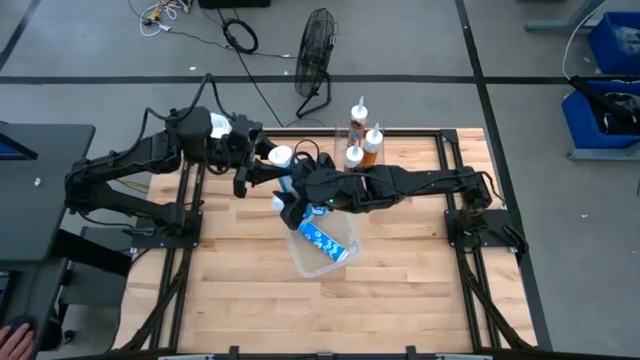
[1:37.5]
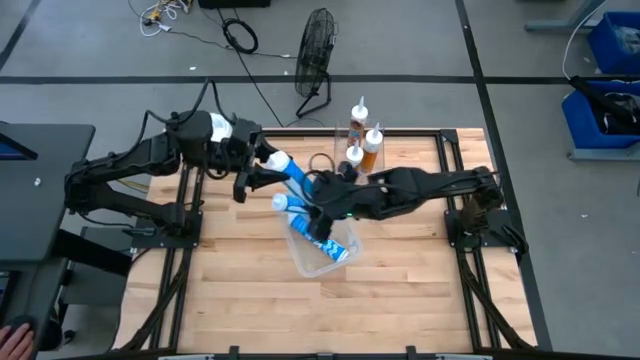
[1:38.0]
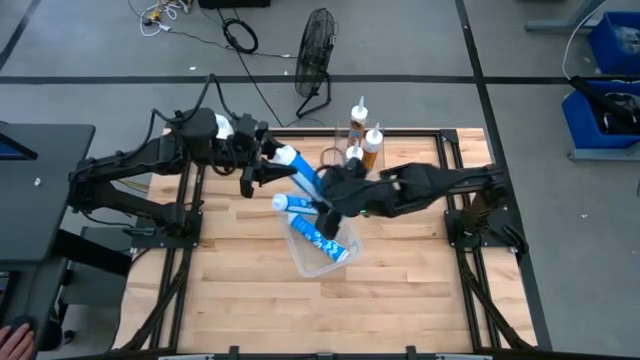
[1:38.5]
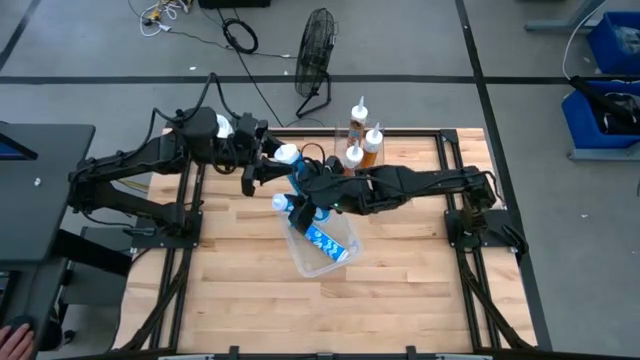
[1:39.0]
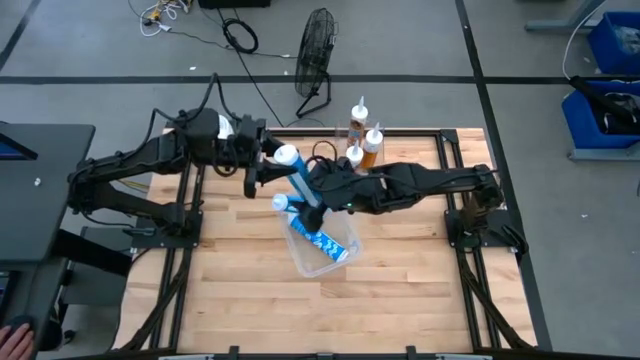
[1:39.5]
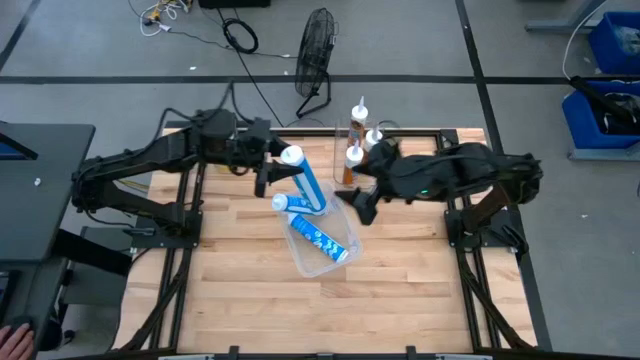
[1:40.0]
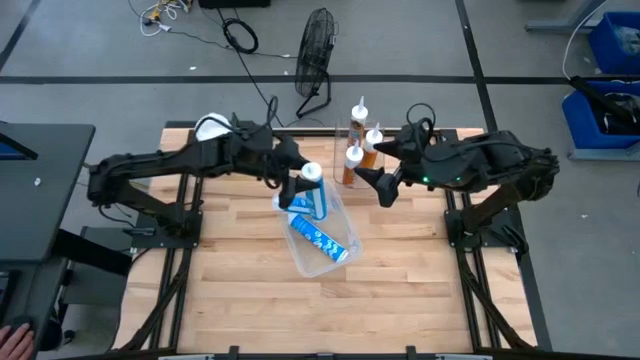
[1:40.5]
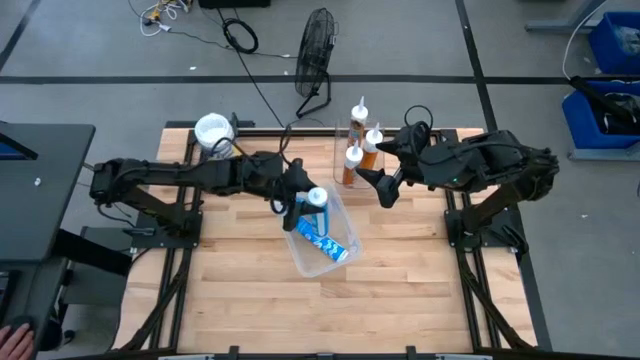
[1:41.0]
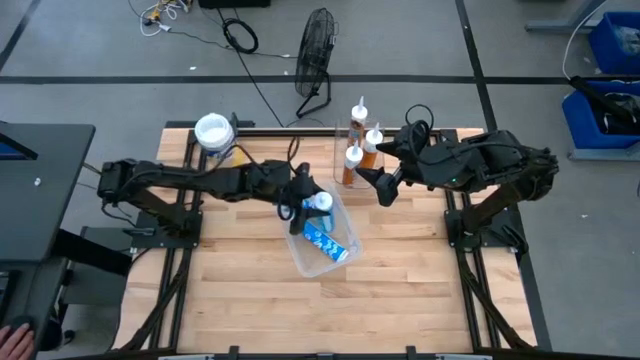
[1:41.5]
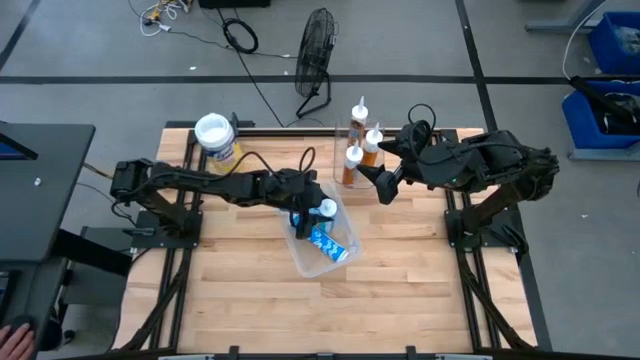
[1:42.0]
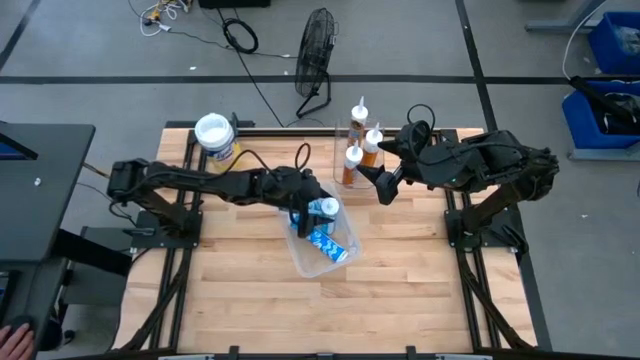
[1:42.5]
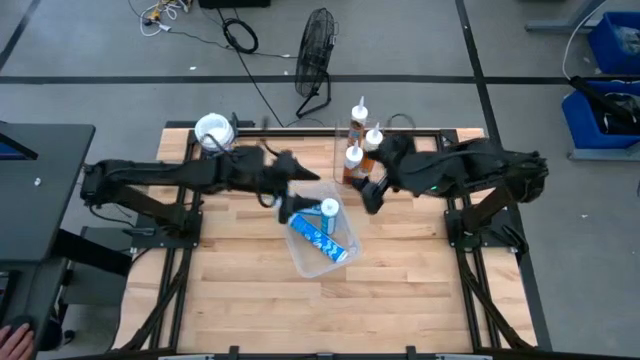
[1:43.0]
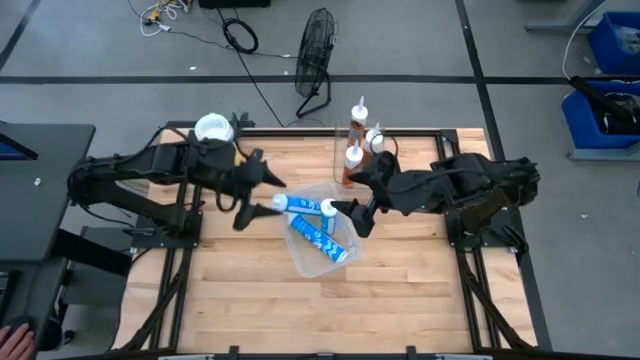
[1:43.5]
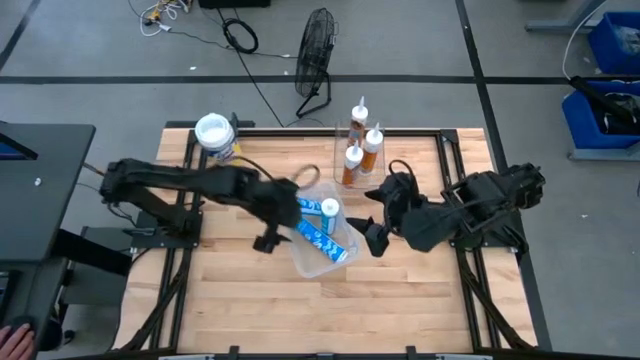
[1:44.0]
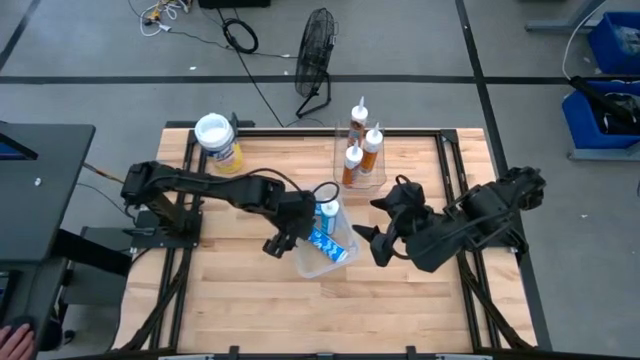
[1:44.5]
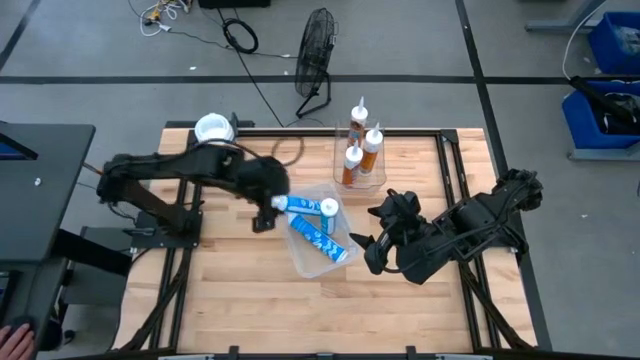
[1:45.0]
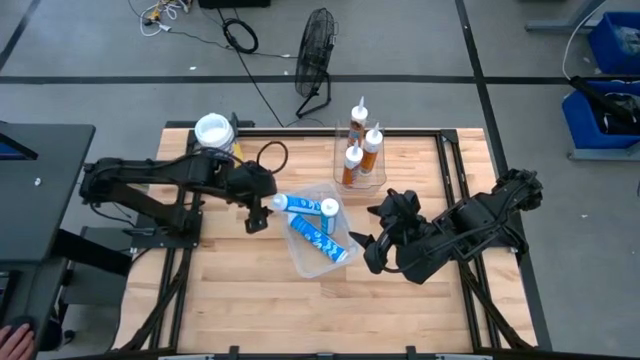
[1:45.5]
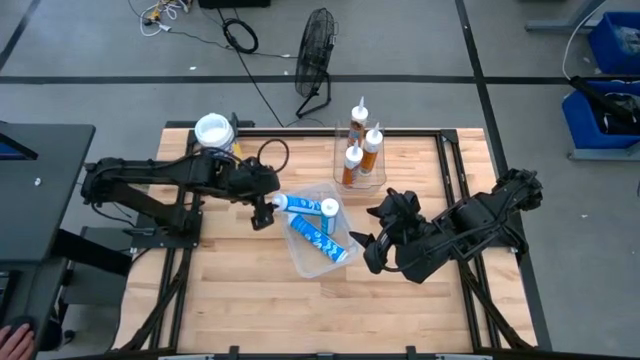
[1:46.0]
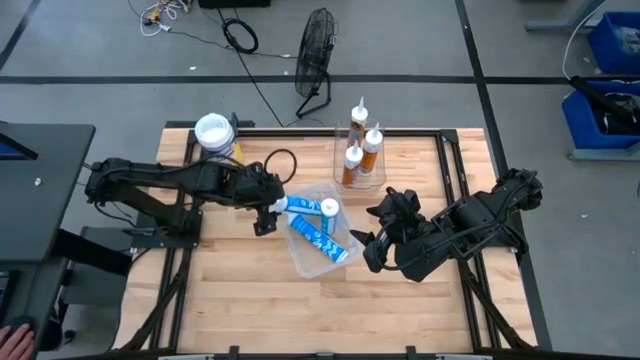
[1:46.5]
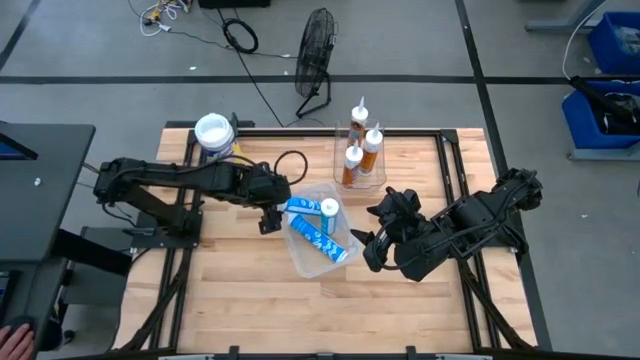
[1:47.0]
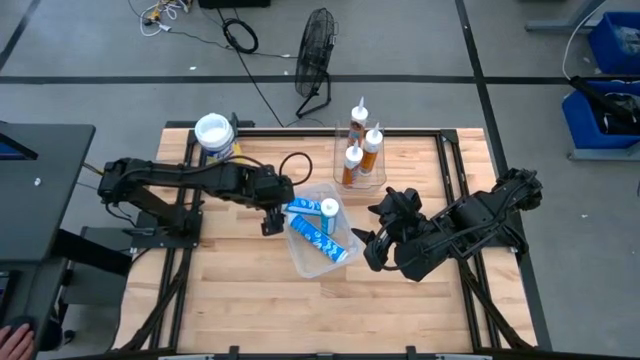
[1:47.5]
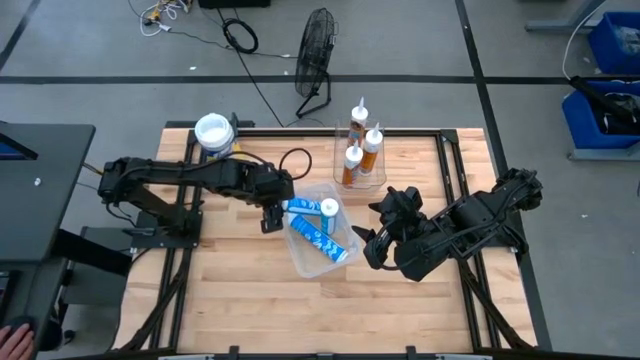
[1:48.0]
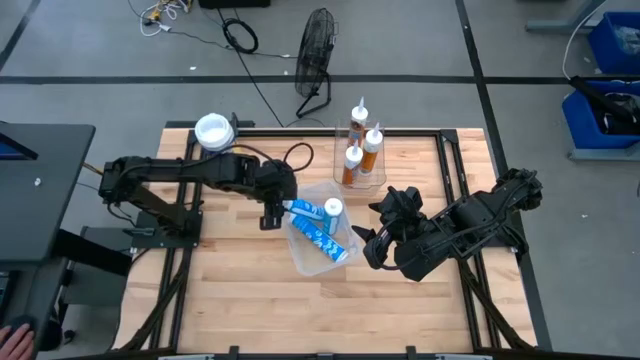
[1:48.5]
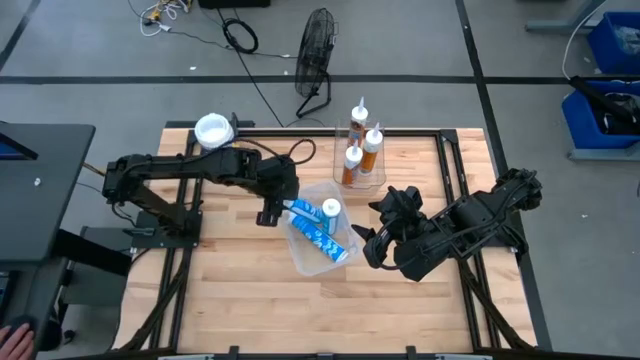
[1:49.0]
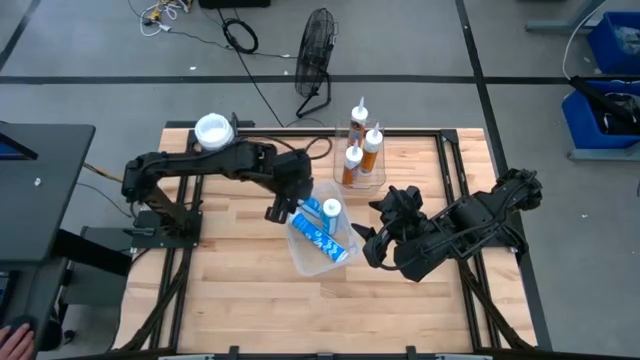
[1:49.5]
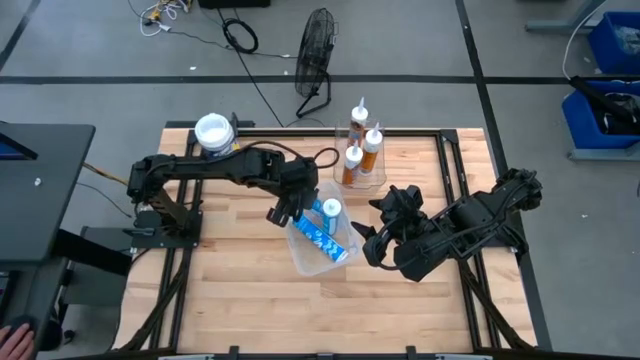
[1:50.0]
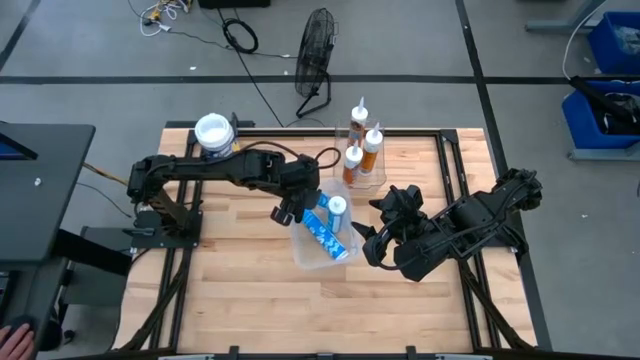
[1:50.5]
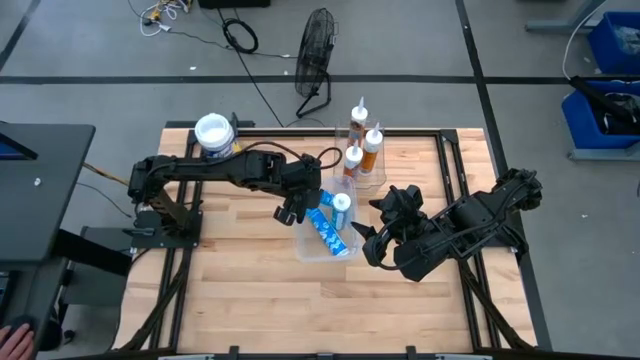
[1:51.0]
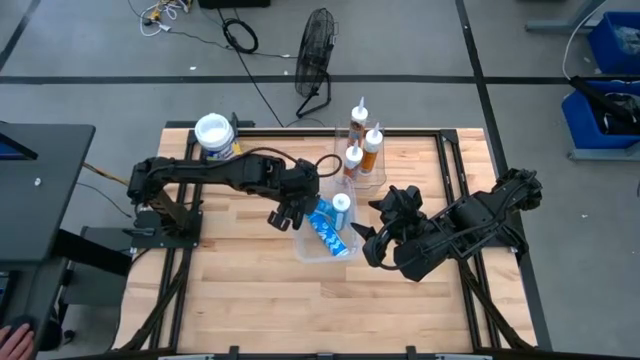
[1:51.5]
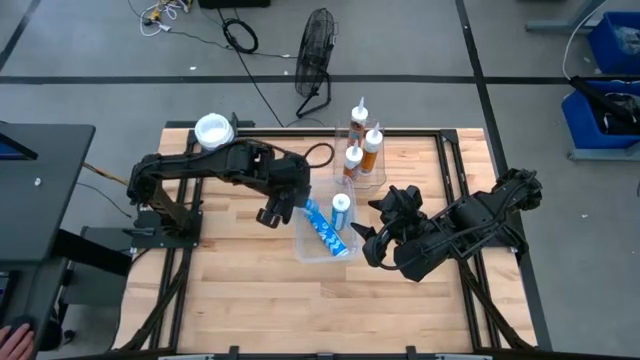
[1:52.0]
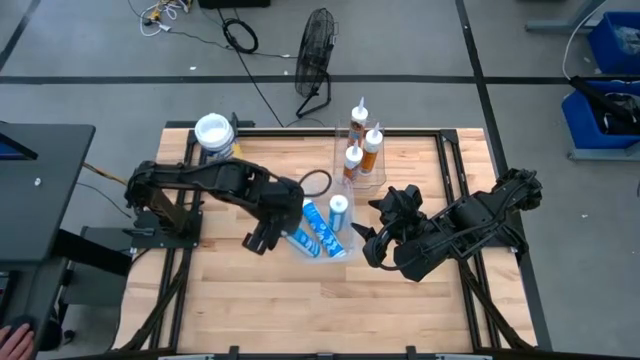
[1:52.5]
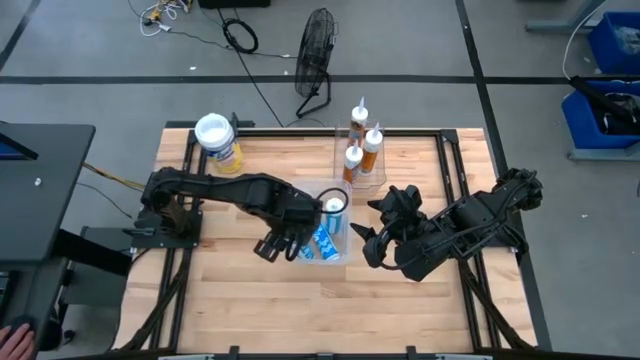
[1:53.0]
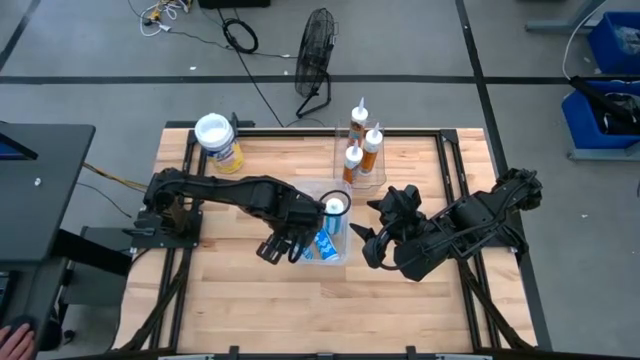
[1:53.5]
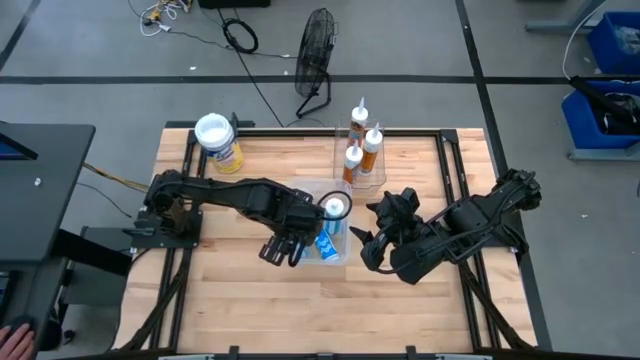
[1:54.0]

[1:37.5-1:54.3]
Task: Sort silicone sealant tubes
Adjust the blue sealants in the bottom transparent bin

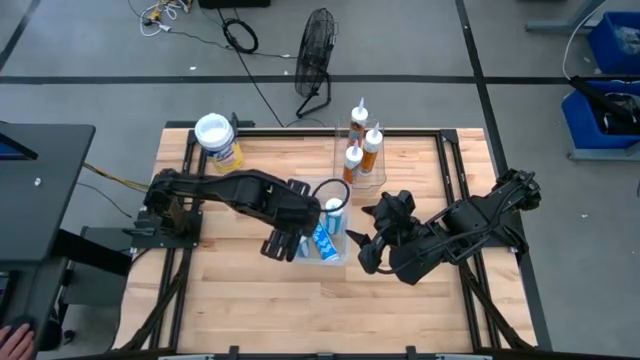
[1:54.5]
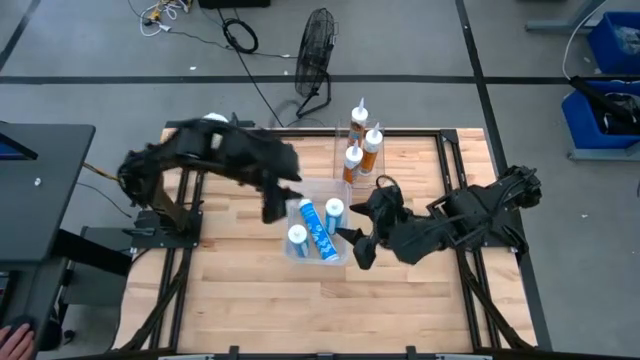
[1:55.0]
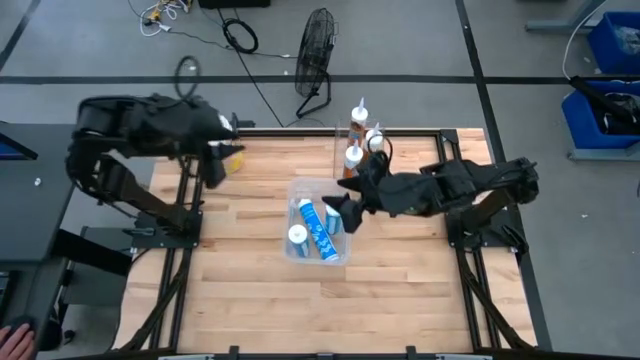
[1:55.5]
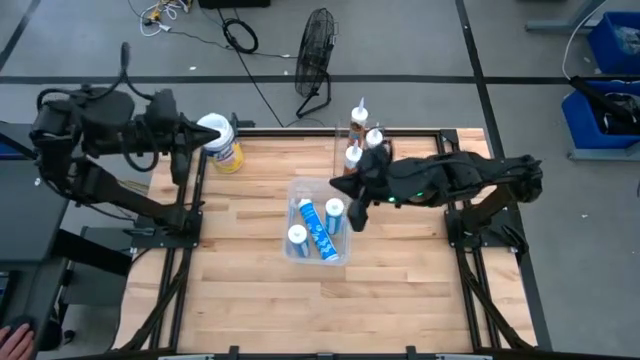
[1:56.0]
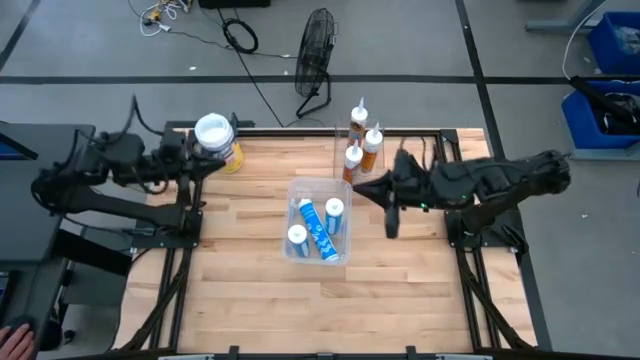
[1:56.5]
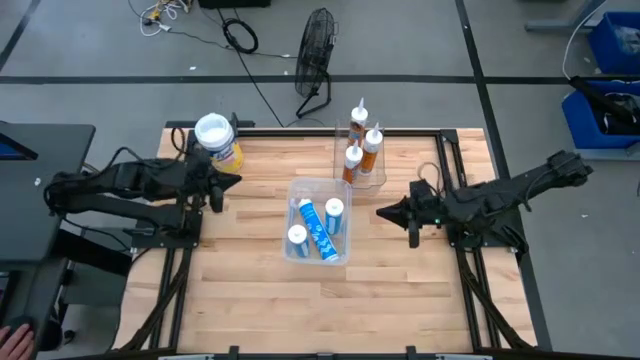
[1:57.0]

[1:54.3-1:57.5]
Return to Home Position
